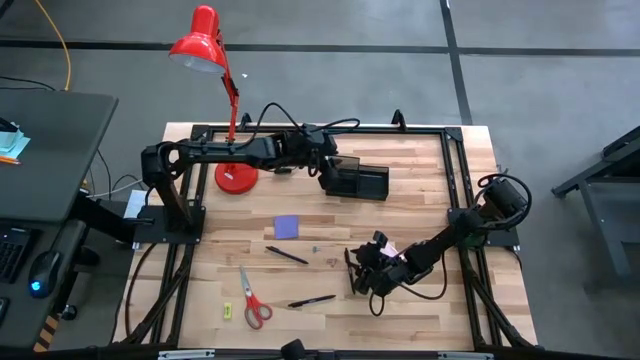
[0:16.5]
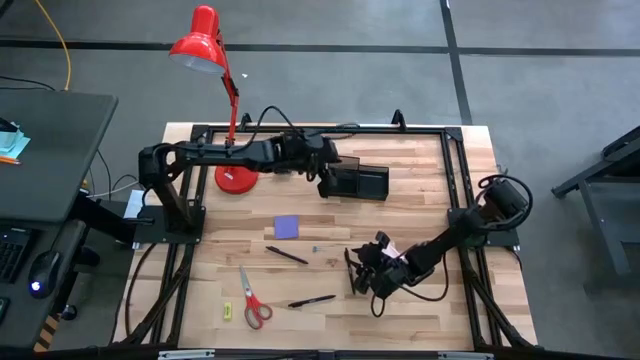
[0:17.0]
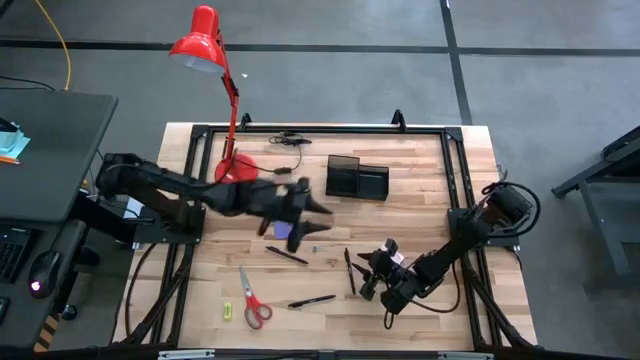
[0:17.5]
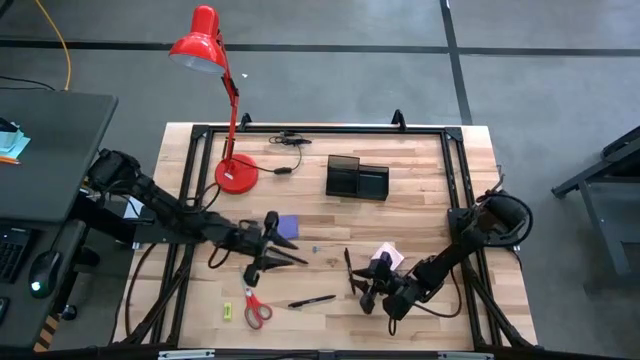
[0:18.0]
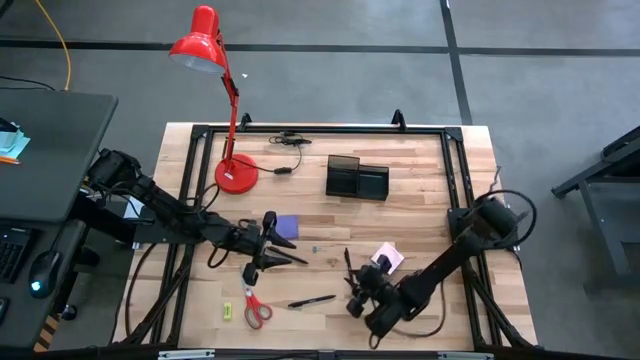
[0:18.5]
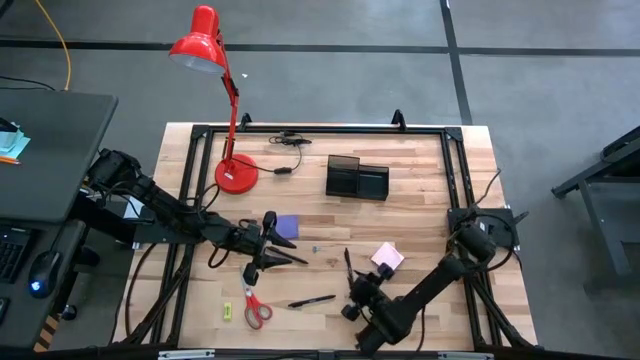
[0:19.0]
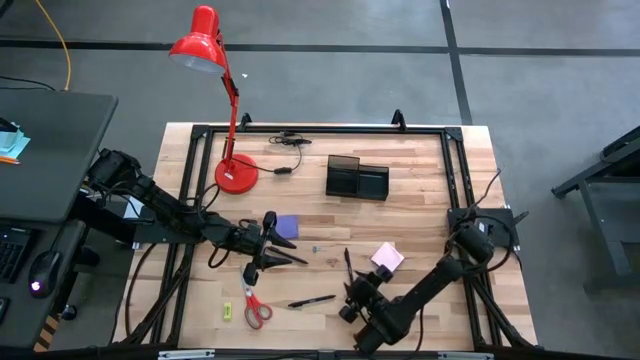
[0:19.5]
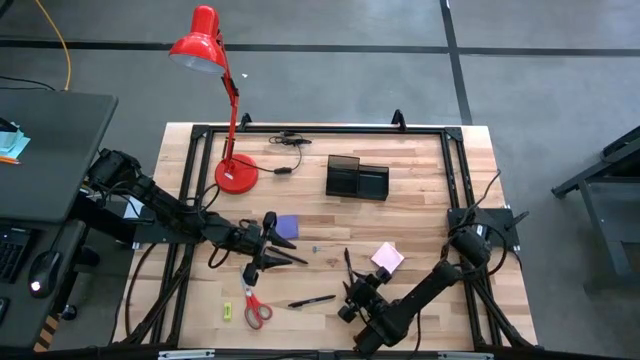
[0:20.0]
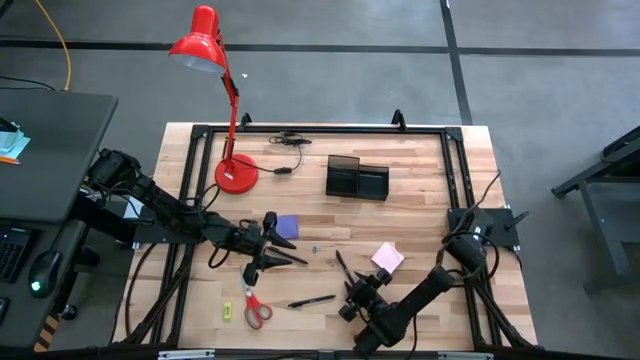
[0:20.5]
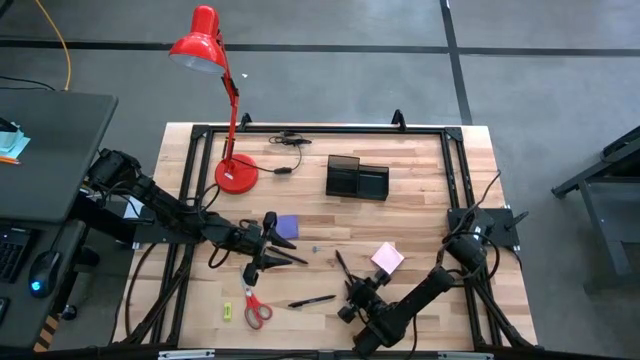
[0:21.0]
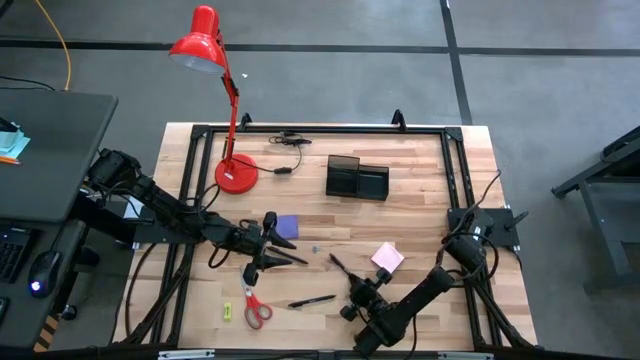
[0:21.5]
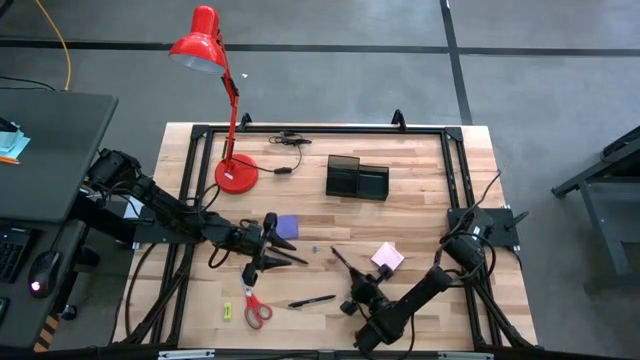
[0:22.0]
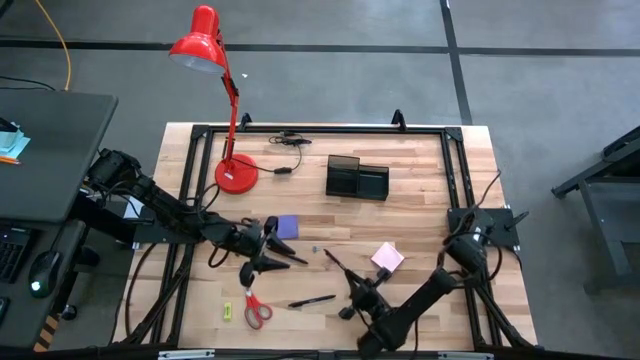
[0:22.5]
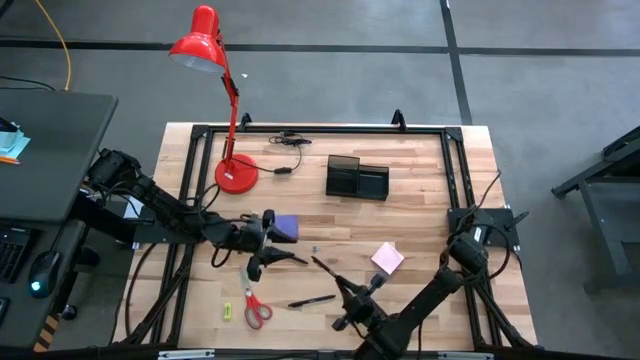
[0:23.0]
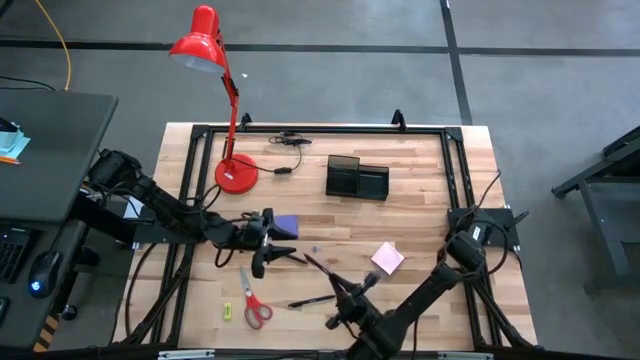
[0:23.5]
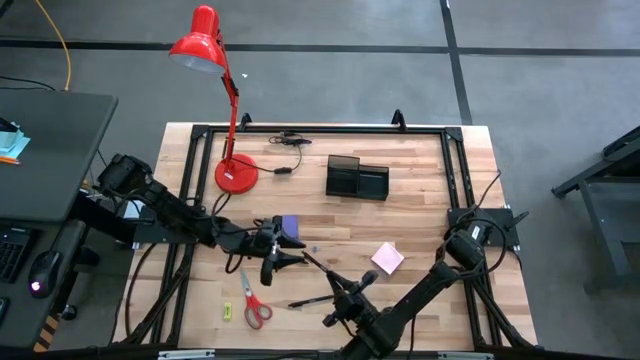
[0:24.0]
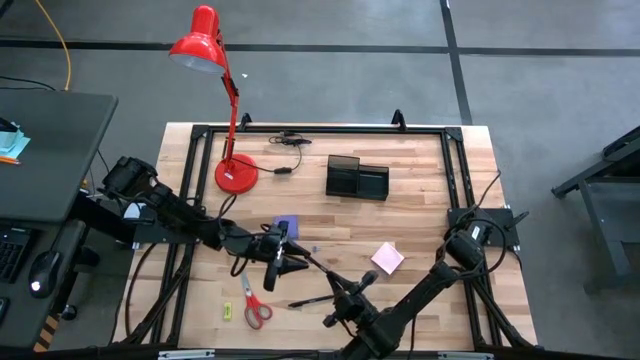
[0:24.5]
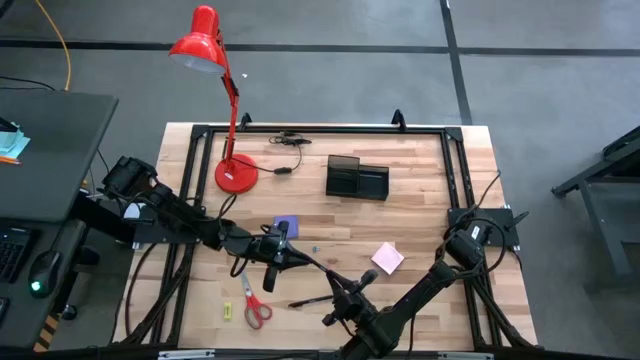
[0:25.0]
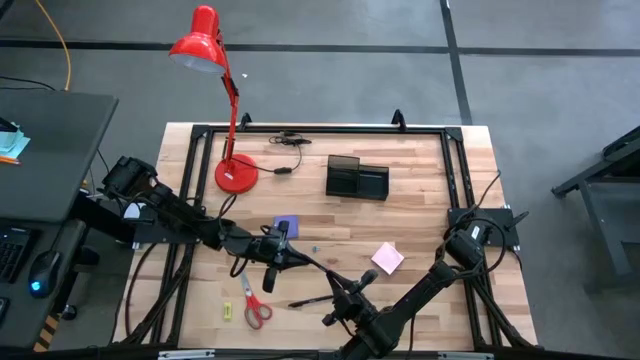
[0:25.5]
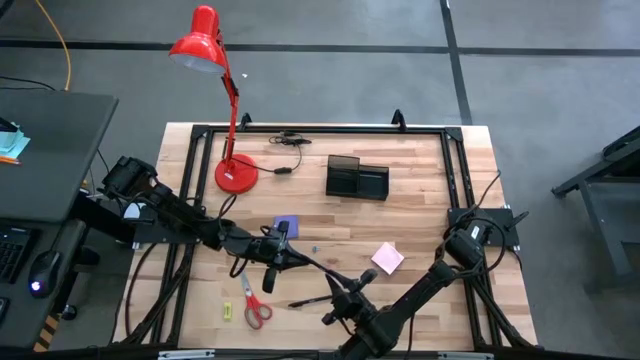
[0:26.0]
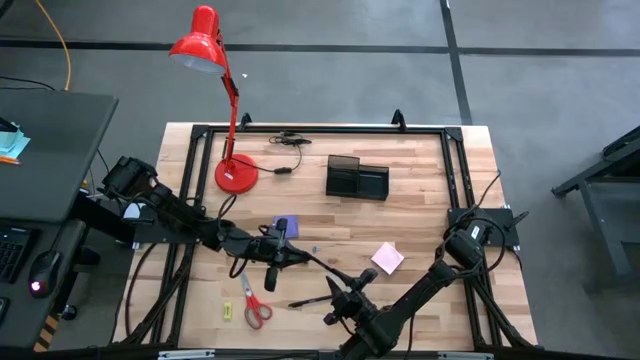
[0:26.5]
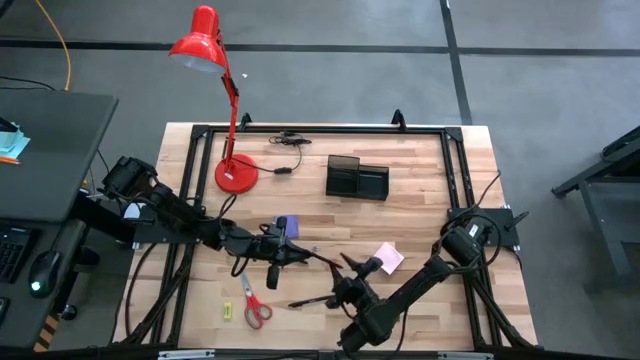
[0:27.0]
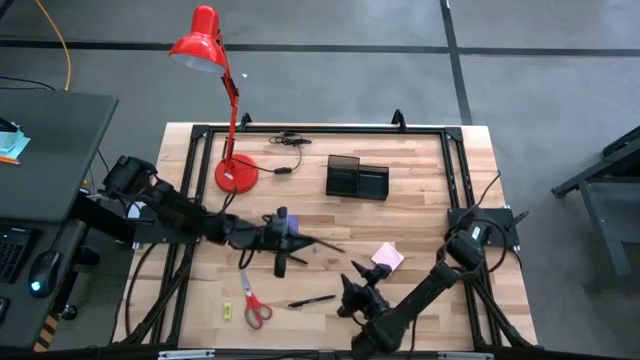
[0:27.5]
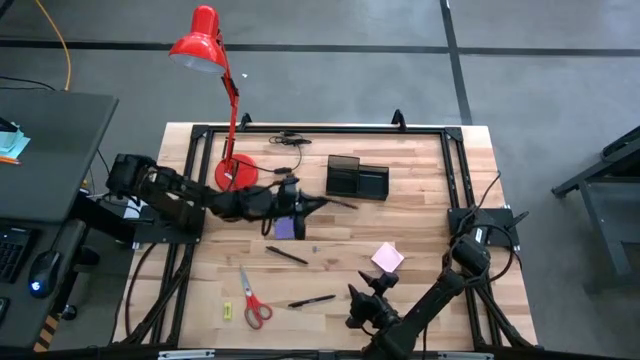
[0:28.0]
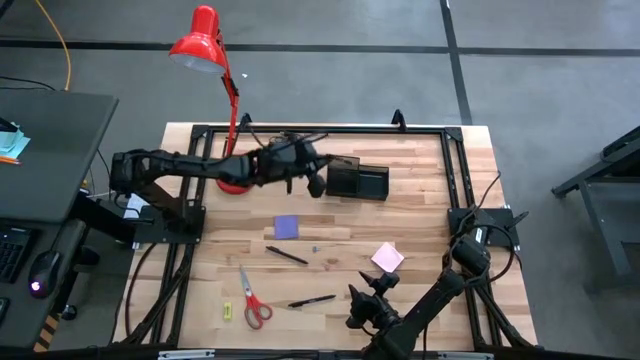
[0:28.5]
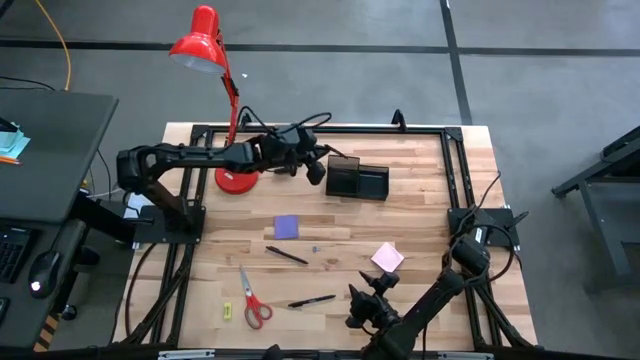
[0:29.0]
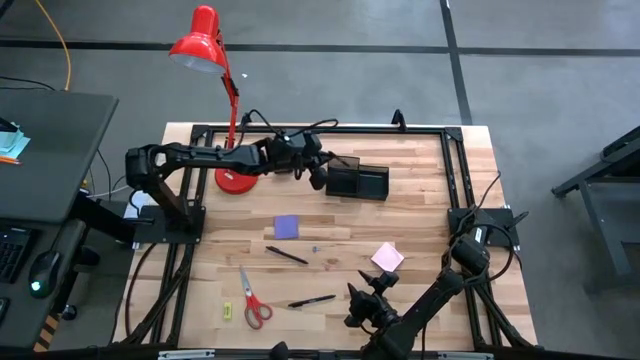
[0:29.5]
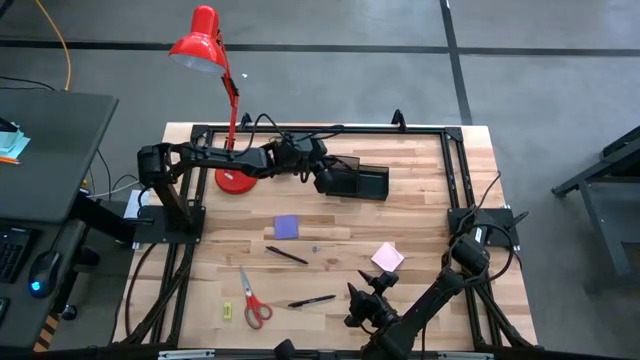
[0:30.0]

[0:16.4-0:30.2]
Task: Pick and place office supplies into organizer
Put the black pen into the black desk organizer

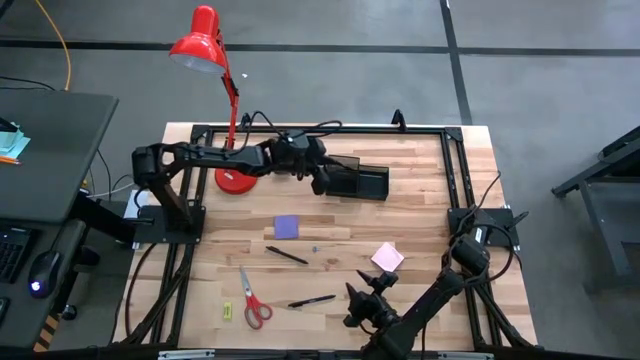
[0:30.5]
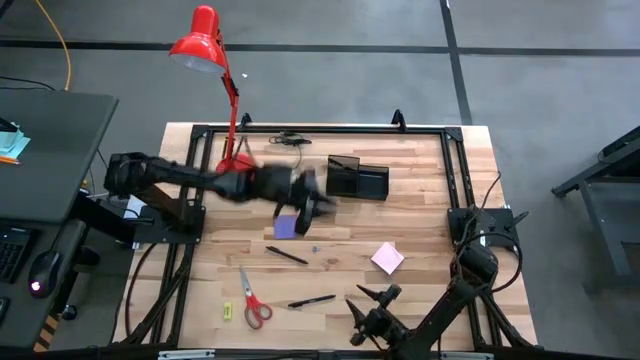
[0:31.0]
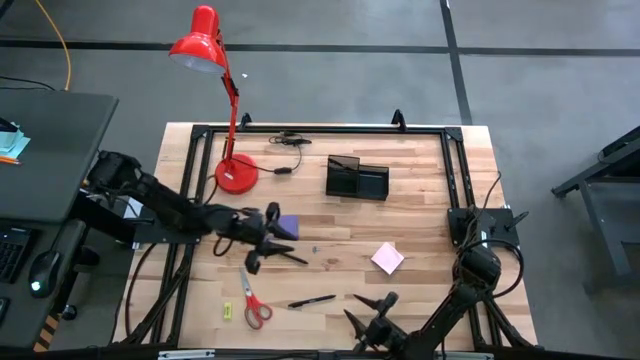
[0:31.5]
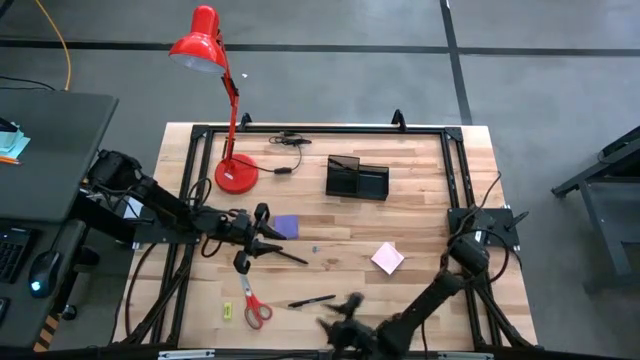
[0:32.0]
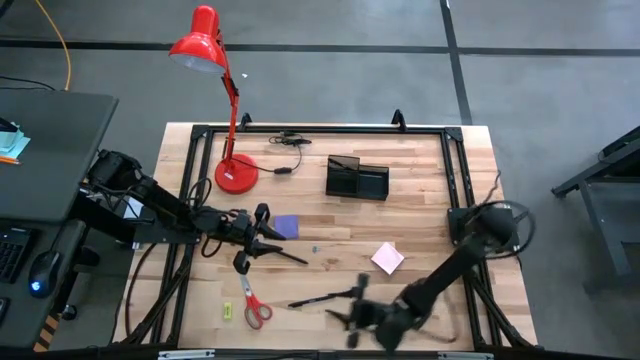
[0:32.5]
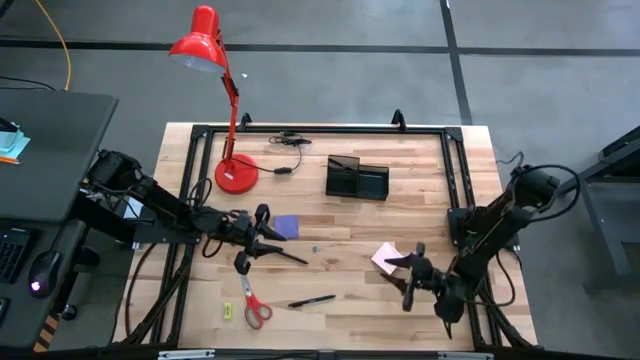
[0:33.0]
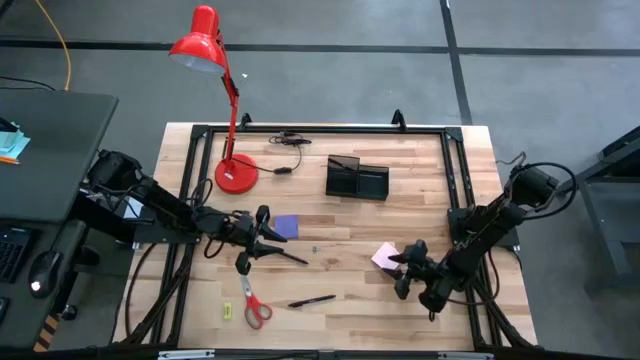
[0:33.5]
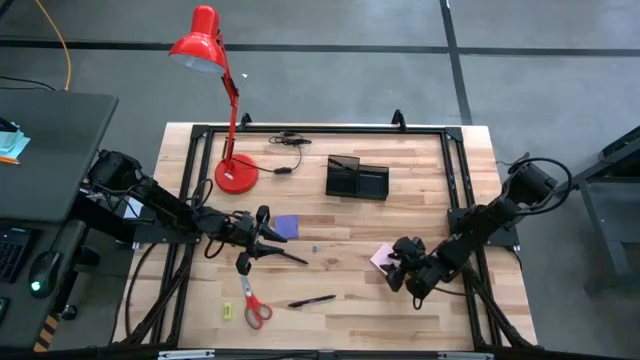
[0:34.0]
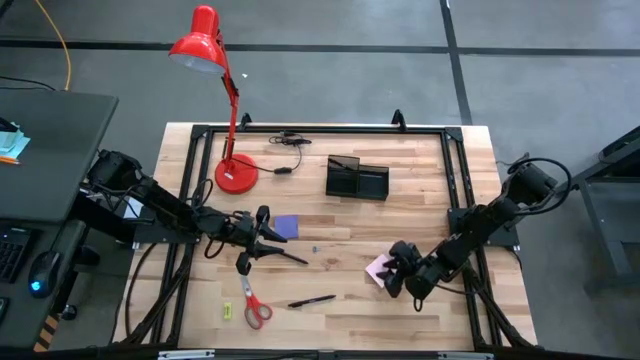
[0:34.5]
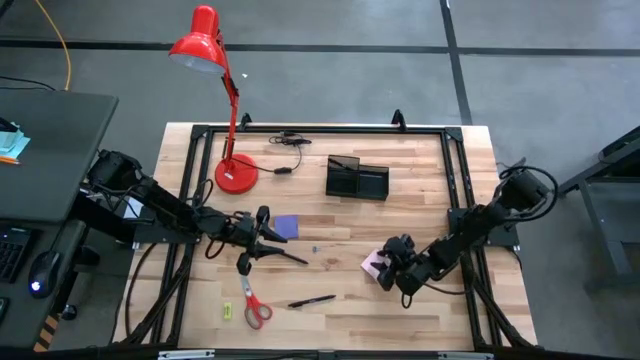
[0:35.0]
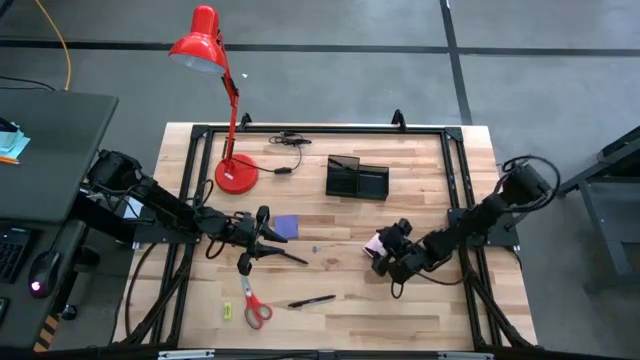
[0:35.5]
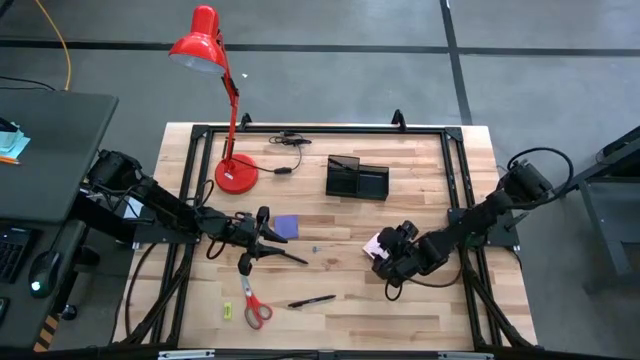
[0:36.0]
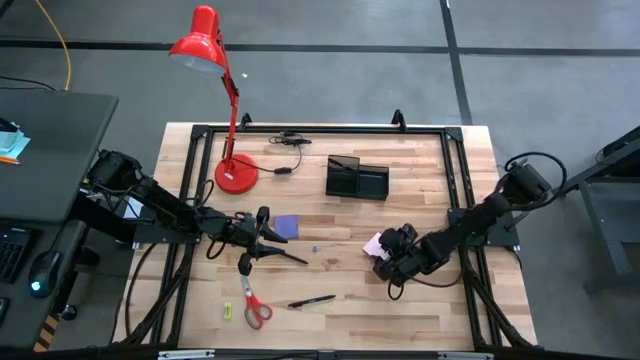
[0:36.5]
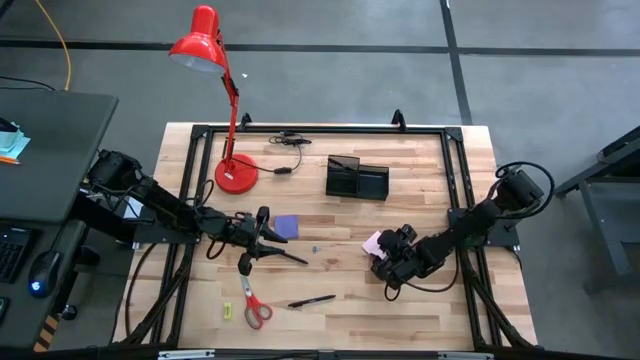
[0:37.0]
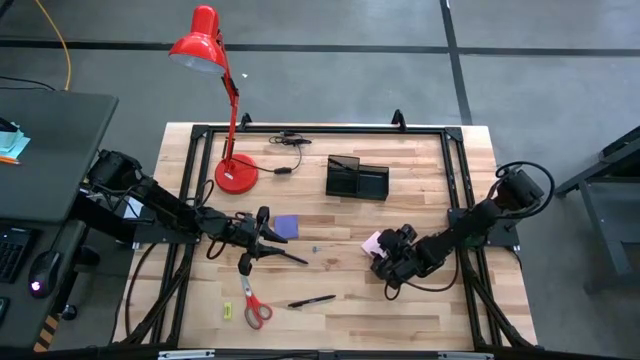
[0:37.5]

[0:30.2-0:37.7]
Put the pink sticky note into the black desk organizer
